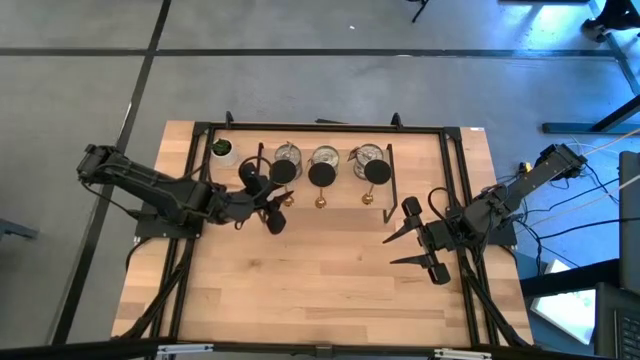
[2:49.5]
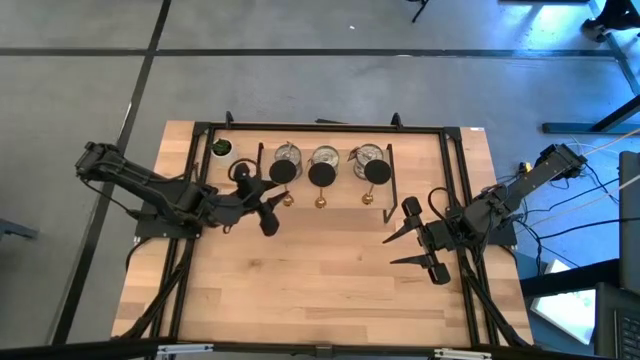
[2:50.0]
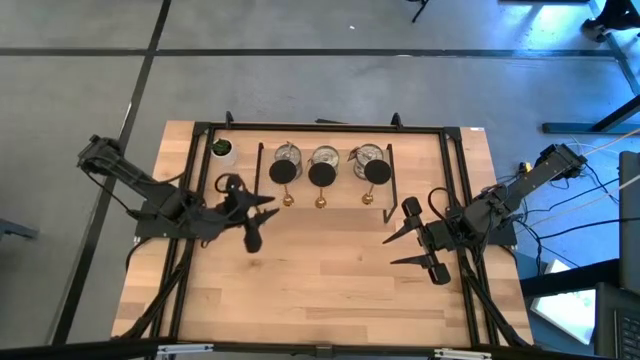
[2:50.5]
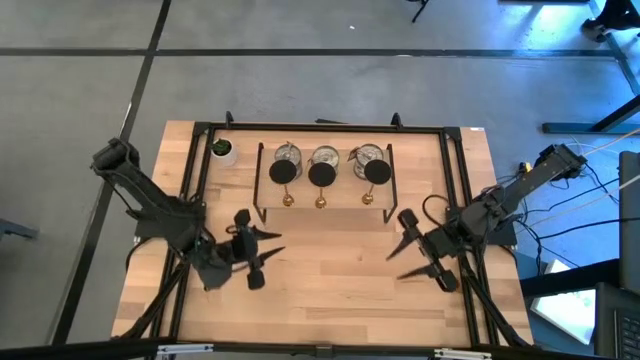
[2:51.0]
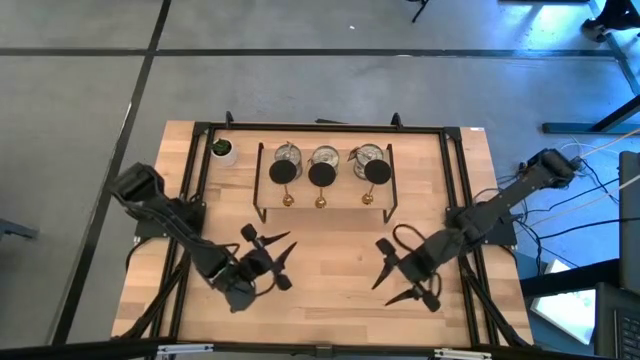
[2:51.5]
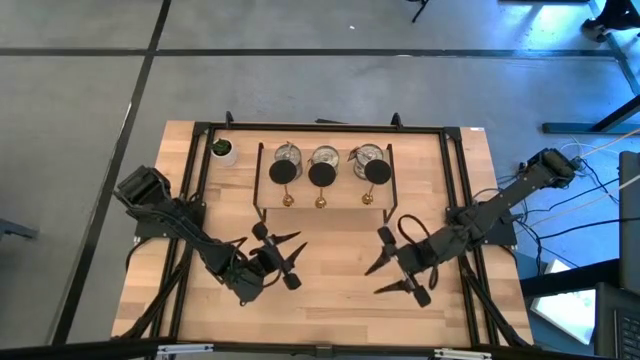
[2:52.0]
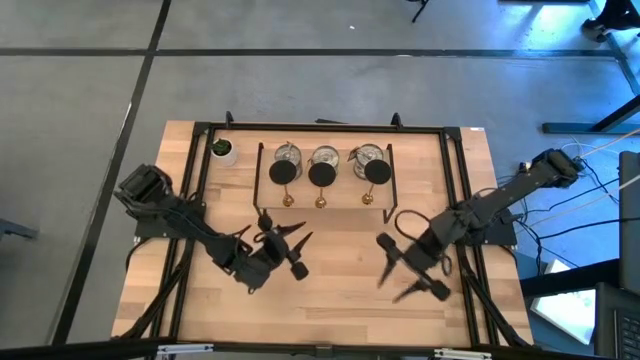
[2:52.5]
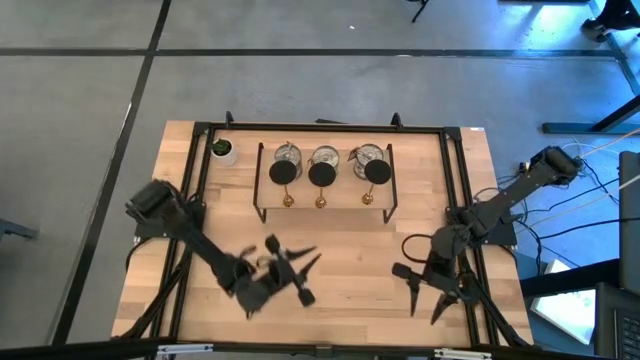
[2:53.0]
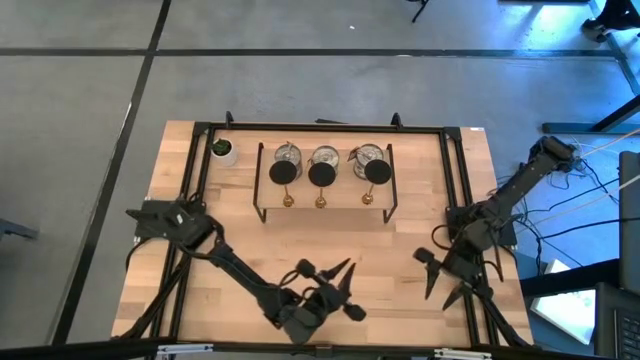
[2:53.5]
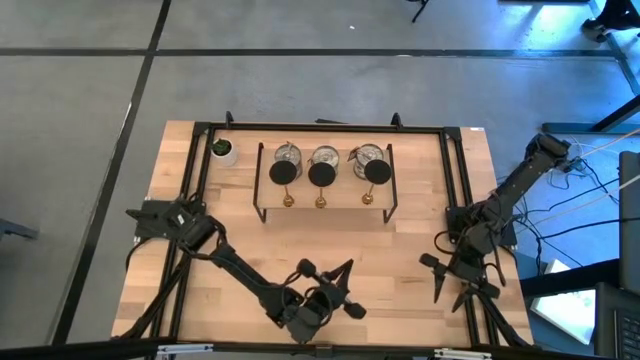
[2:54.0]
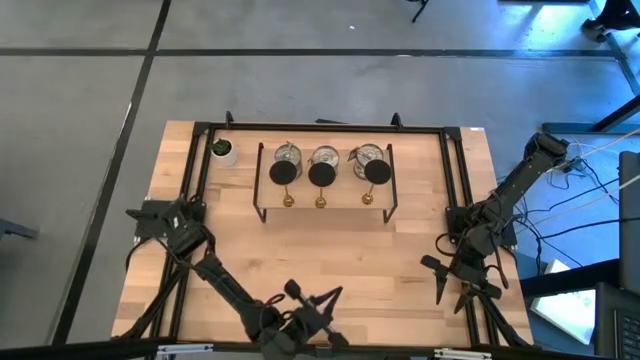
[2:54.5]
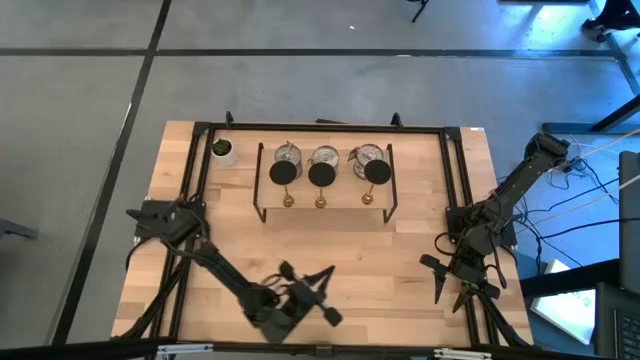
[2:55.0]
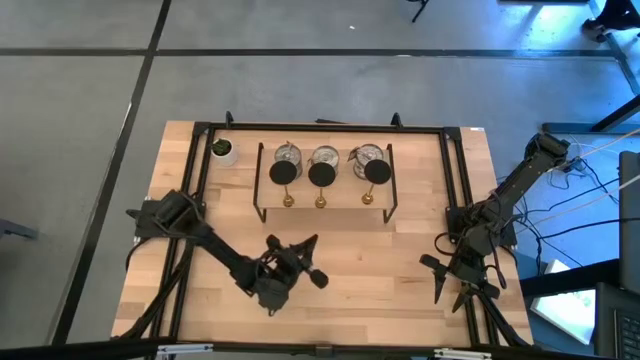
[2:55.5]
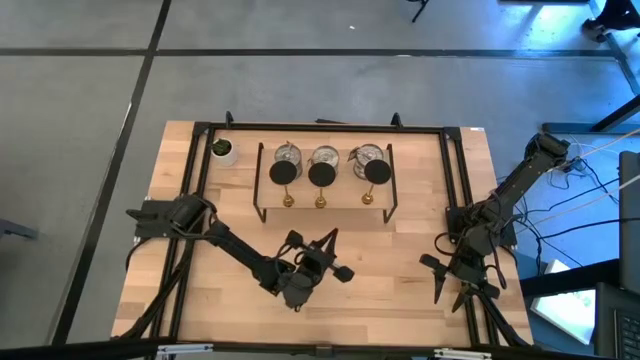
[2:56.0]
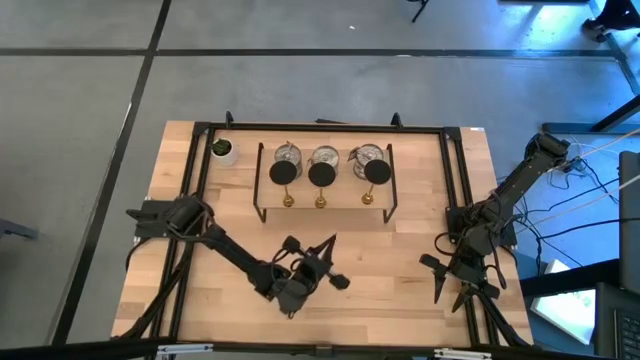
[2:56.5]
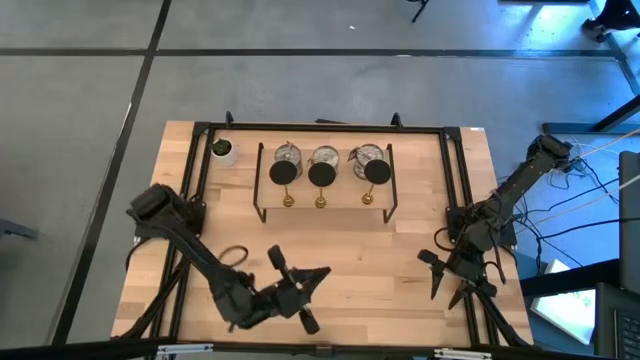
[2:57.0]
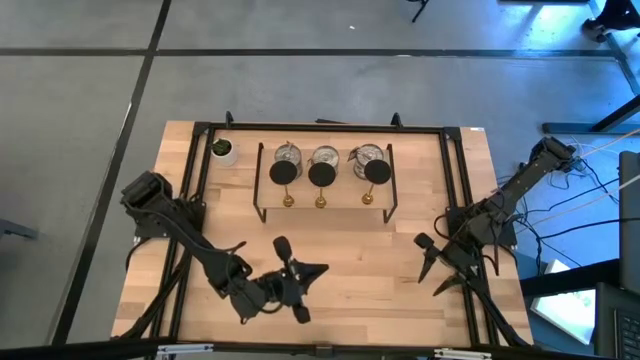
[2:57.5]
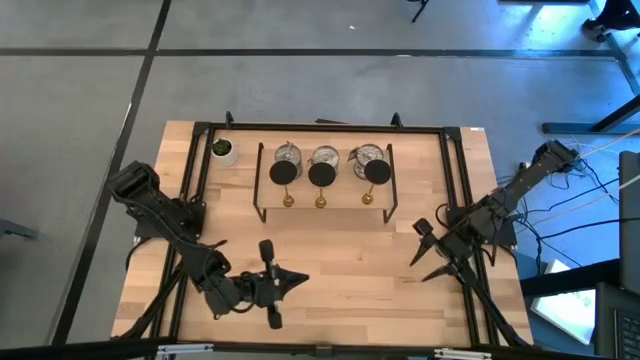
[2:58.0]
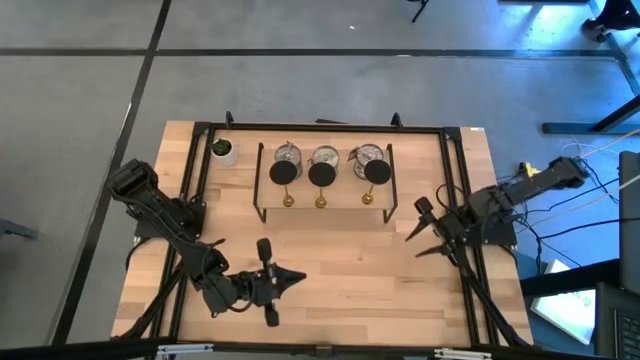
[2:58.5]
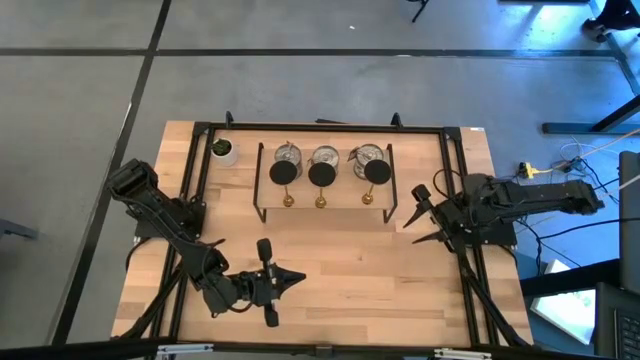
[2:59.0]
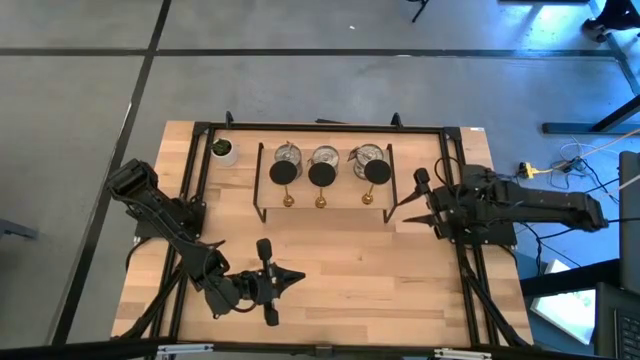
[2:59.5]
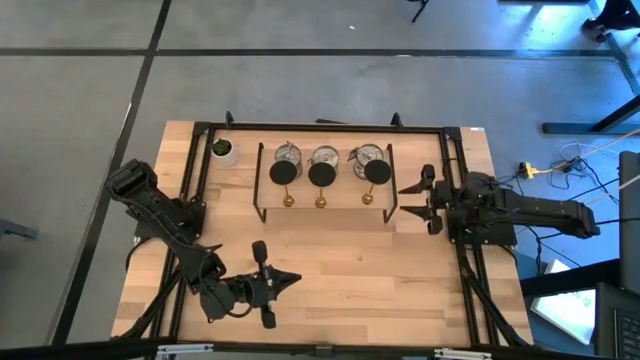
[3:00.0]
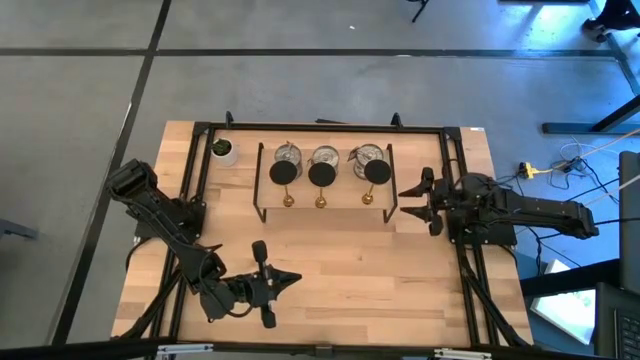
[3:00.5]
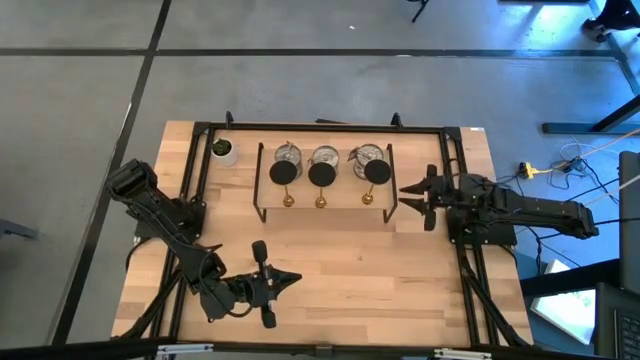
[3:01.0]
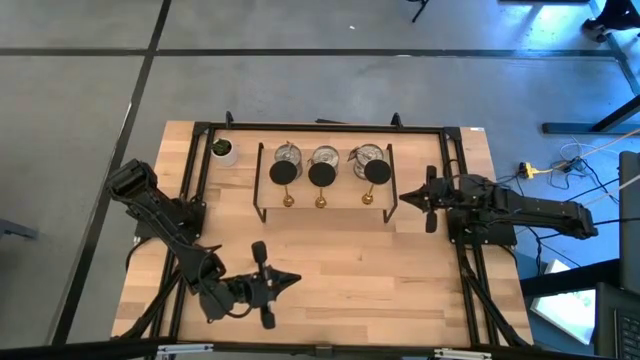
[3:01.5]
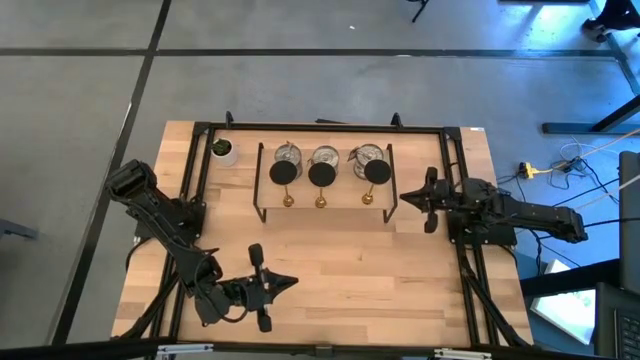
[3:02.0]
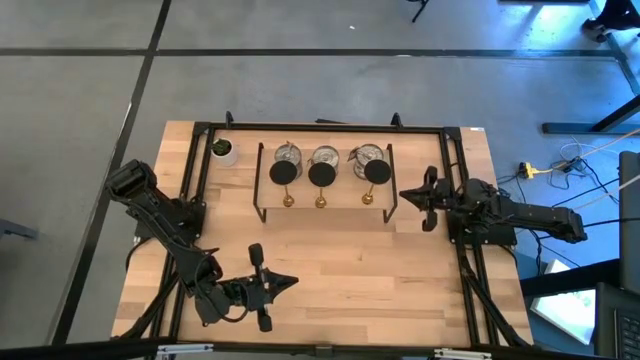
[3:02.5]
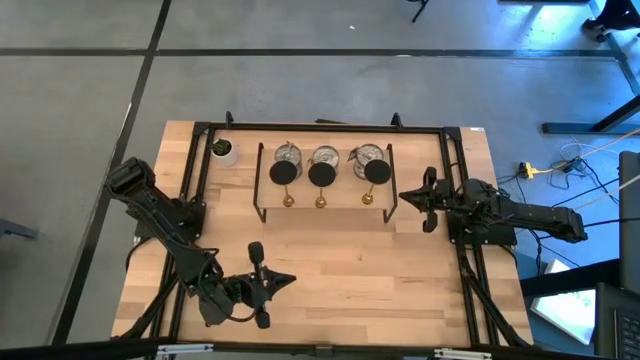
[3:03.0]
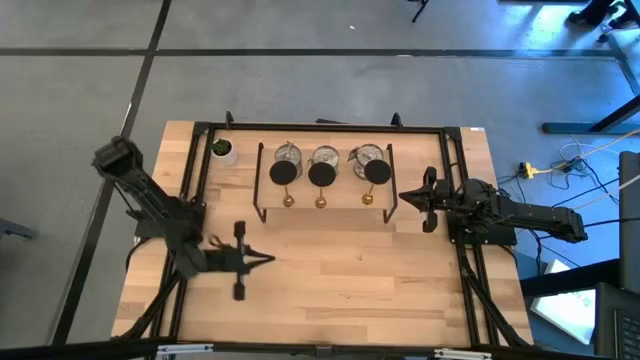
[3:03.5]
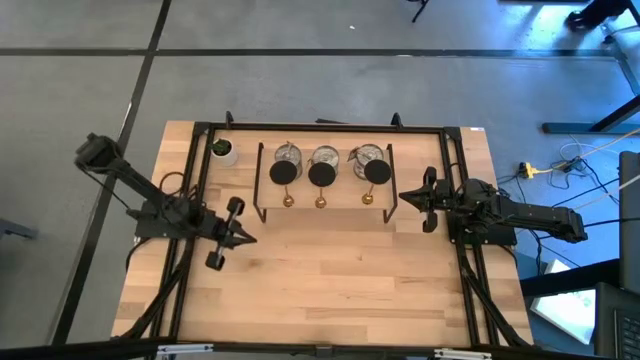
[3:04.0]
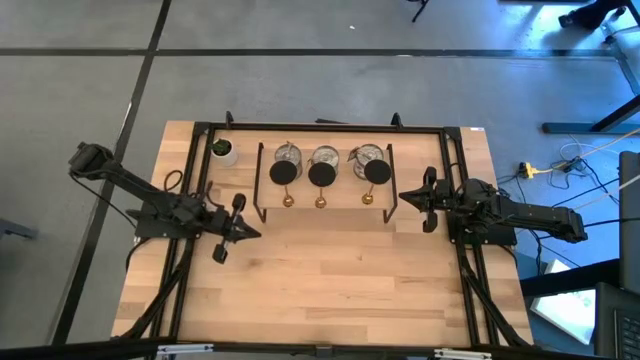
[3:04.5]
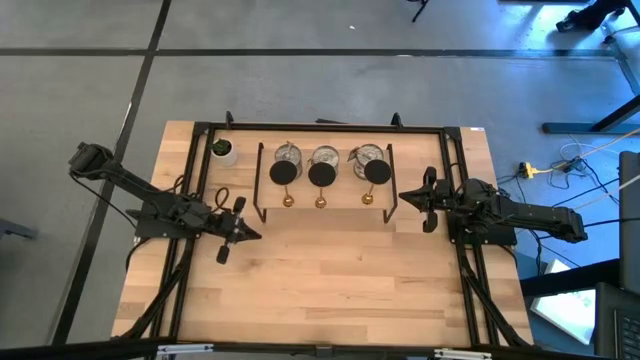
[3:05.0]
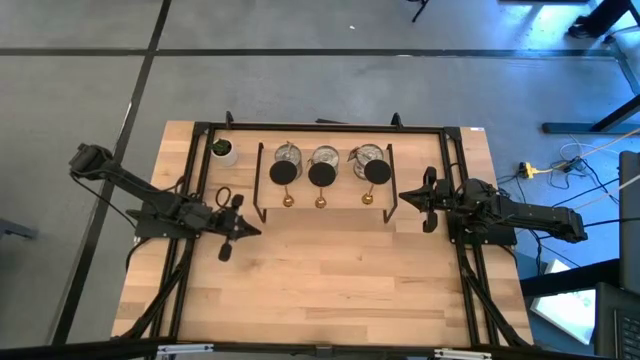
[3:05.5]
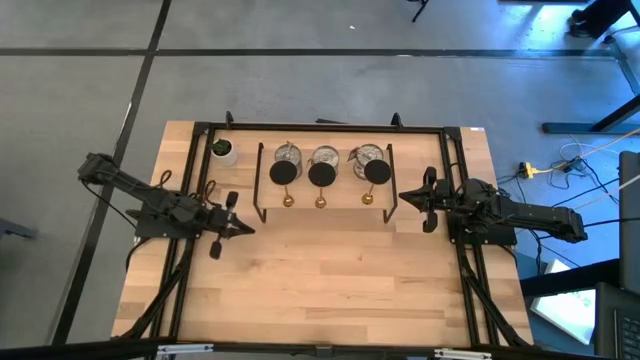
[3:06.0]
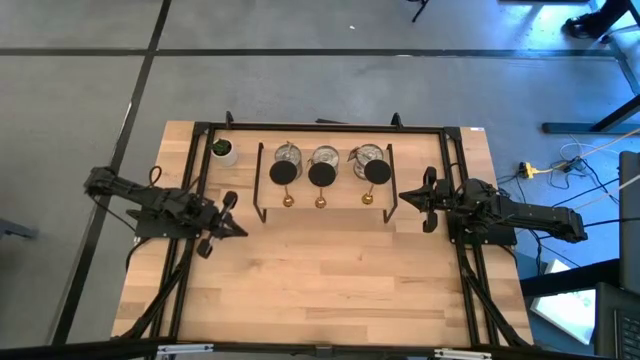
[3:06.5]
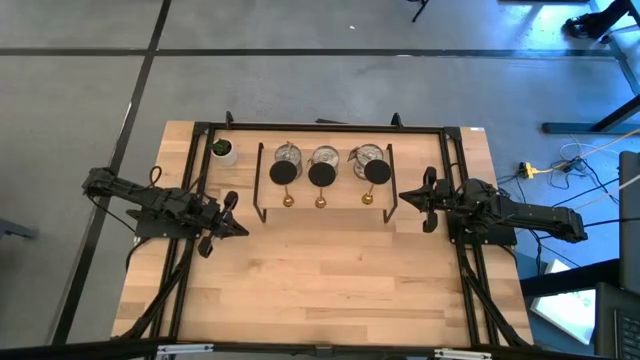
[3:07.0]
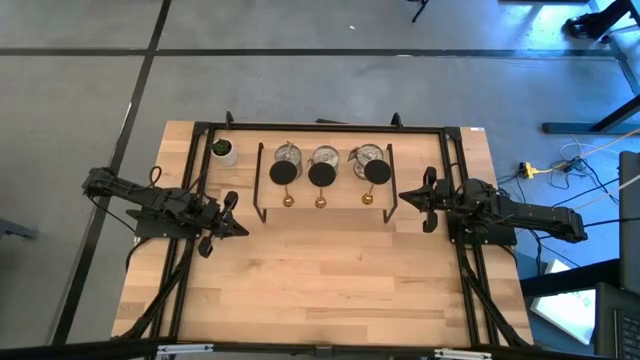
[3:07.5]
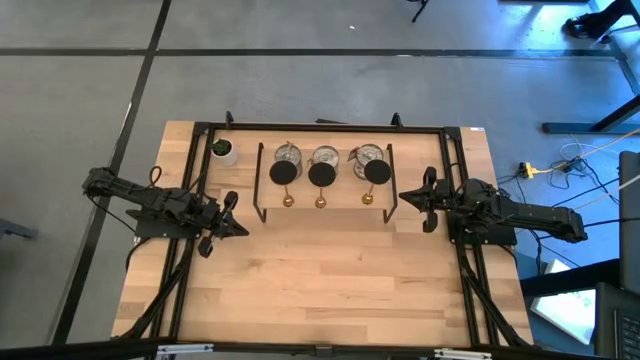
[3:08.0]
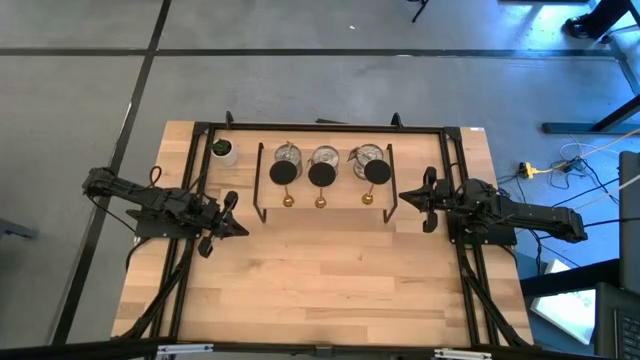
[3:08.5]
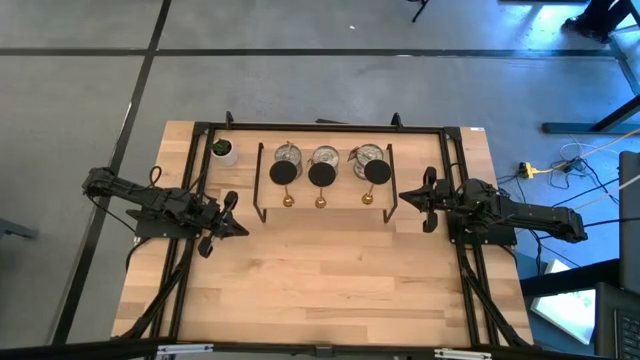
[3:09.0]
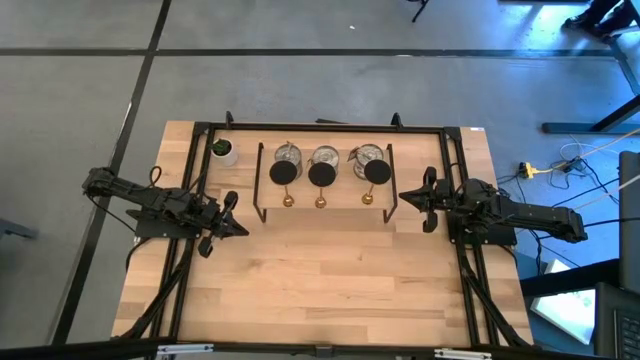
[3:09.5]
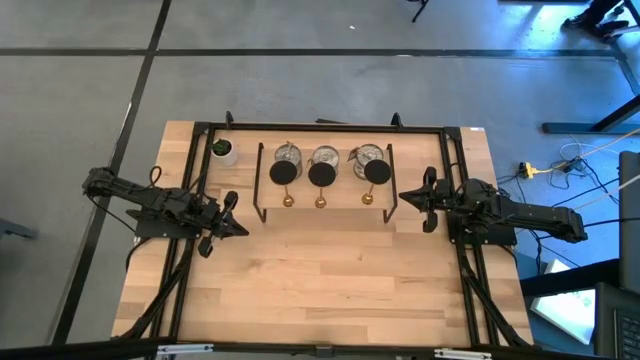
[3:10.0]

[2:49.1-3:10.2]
Task: Pick & Place candle stick holders
Return to Home Position
